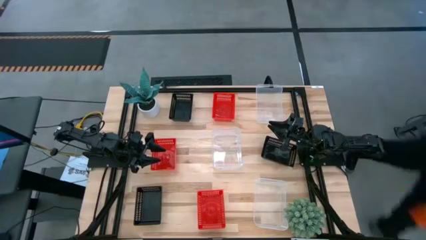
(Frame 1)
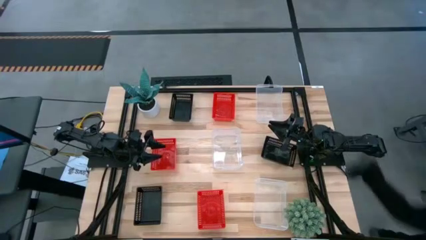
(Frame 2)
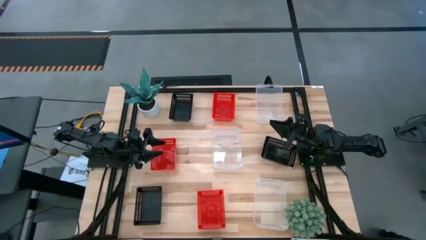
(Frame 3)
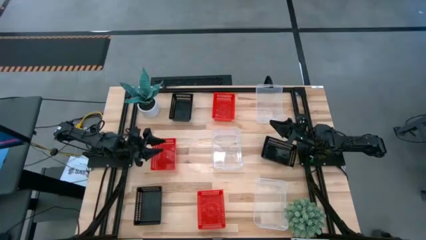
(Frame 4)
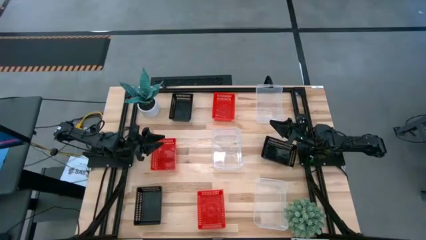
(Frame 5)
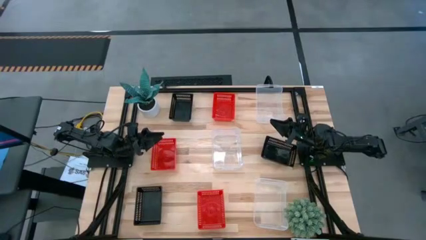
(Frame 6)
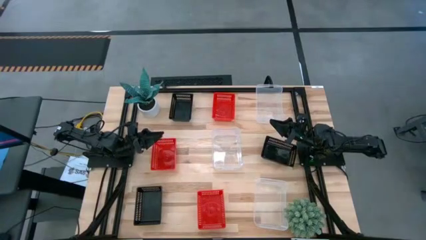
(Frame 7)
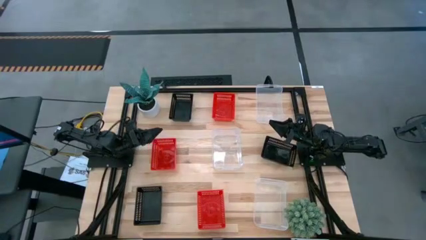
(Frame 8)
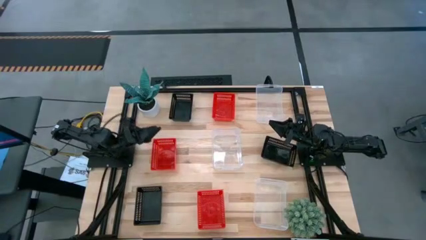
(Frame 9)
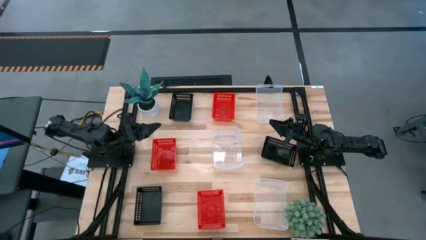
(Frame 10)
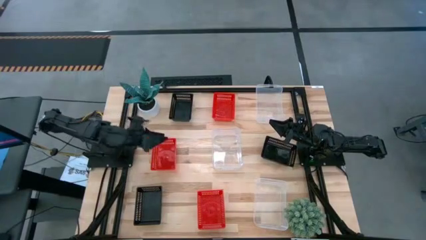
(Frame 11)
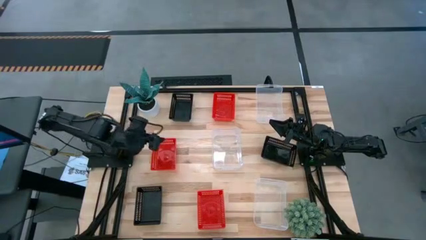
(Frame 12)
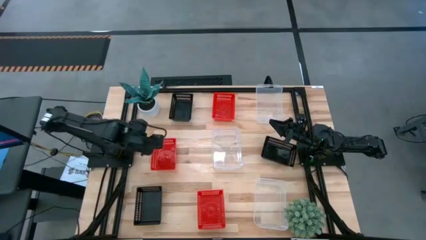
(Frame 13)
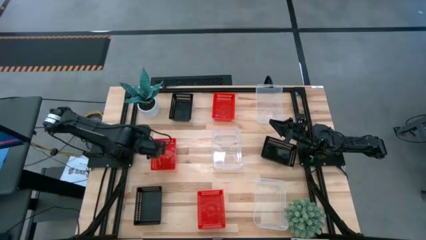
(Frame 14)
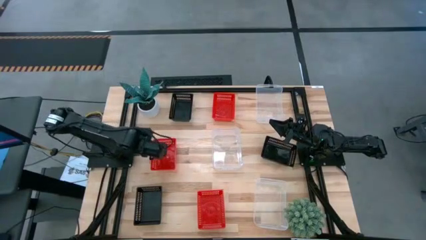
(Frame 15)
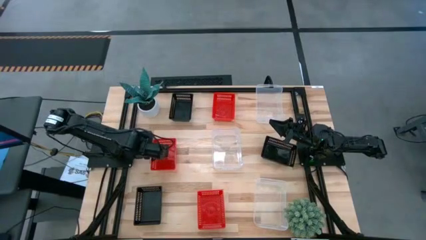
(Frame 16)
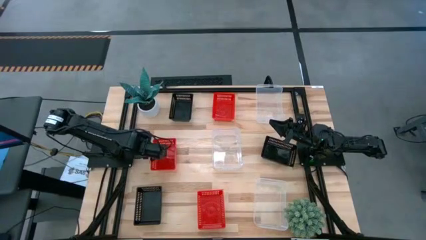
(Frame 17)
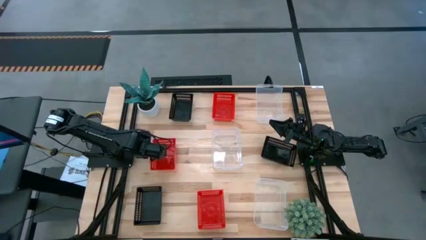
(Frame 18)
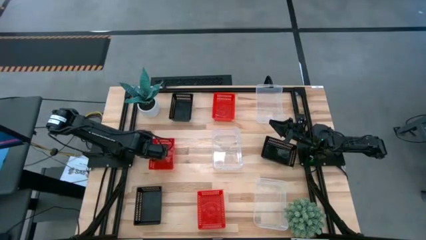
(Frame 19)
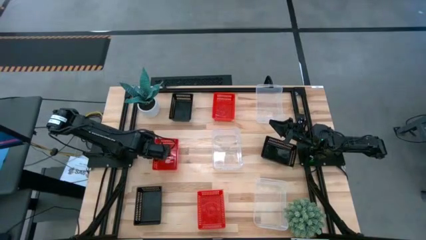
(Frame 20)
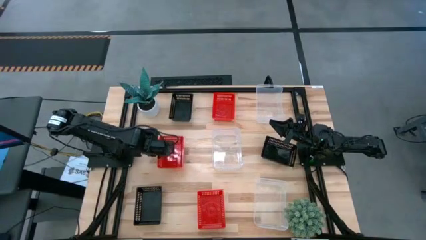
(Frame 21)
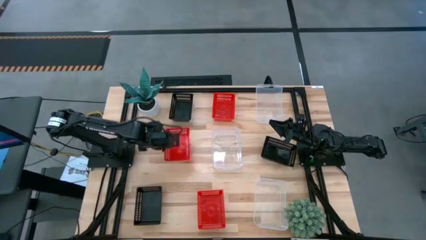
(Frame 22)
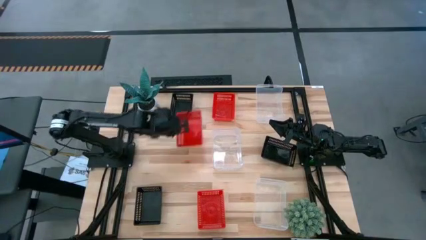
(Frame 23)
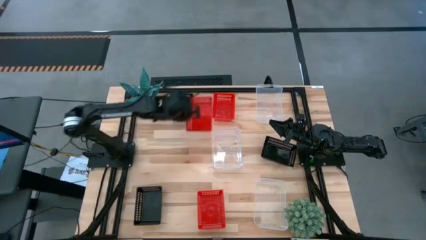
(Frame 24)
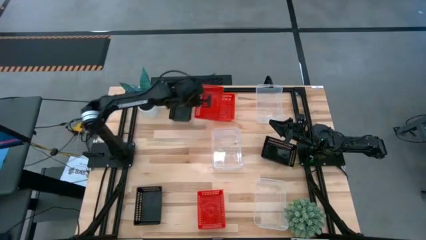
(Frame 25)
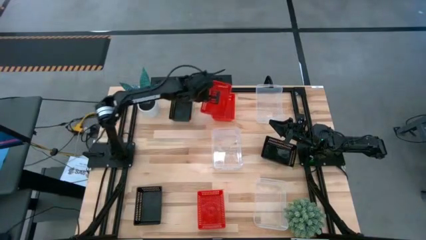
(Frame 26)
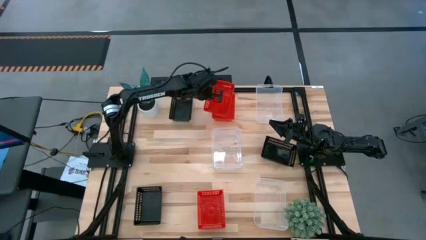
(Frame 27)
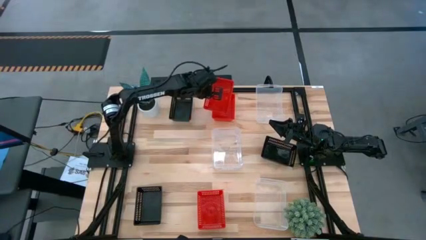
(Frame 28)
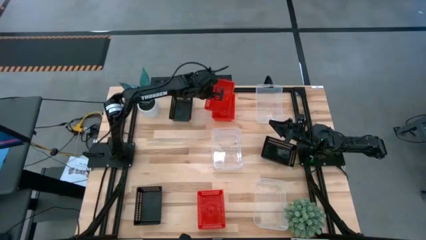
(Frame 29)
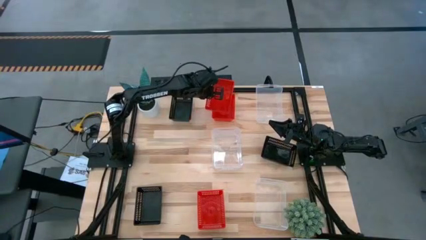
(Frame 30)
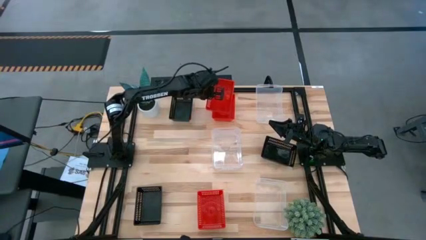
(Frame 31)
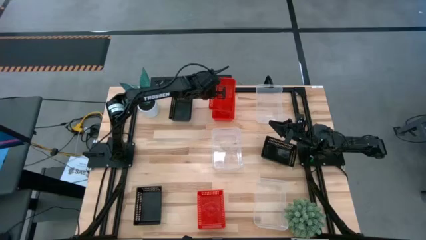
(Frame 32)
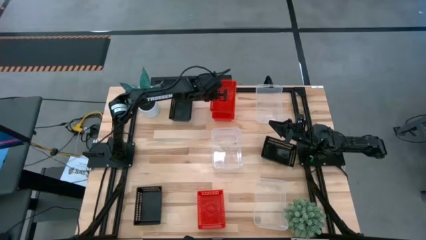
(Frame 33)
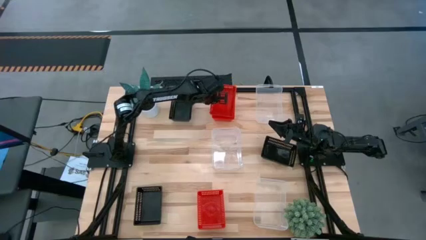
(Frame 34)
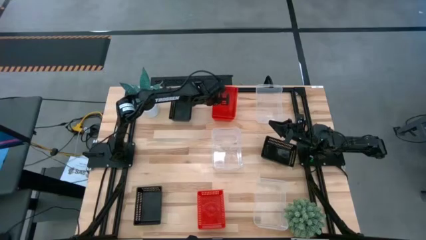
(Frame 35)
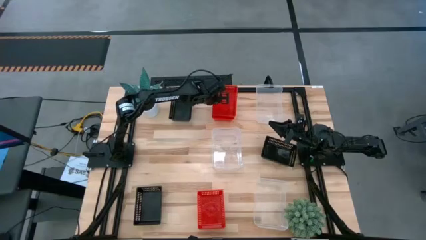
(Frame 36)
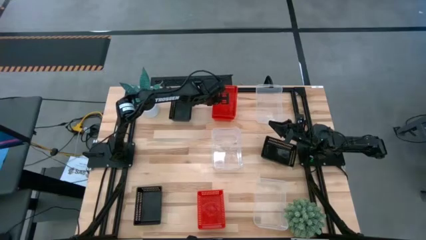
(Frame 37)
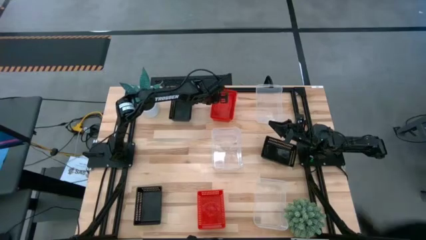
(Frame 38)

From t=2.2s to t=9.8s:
Stack the middle red bin on the top red bin

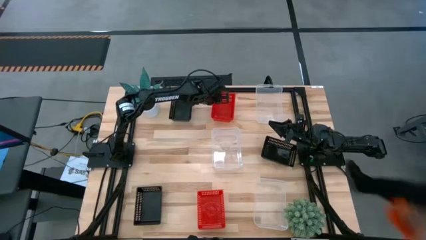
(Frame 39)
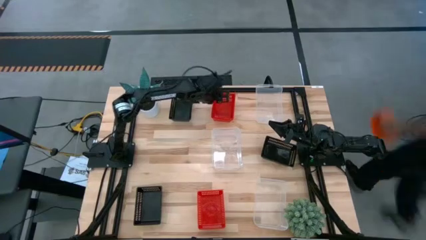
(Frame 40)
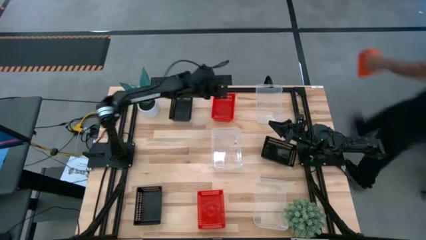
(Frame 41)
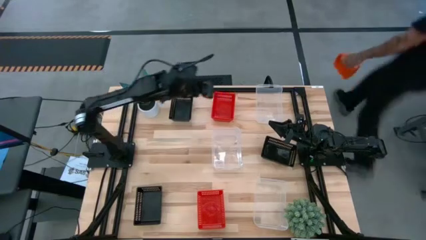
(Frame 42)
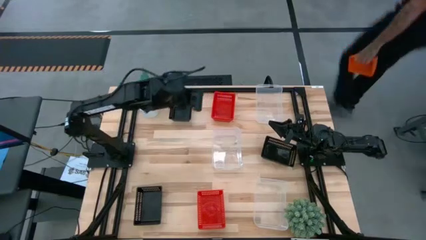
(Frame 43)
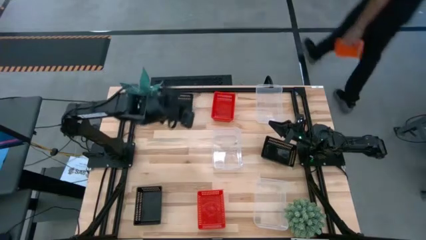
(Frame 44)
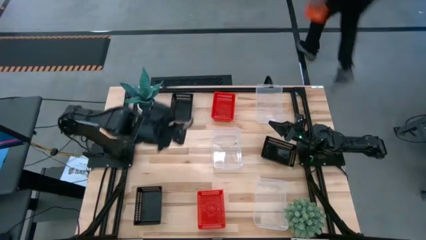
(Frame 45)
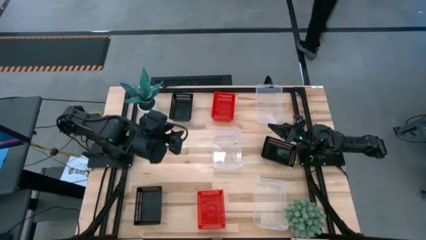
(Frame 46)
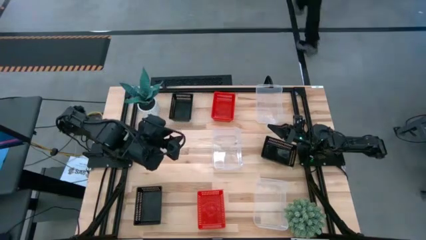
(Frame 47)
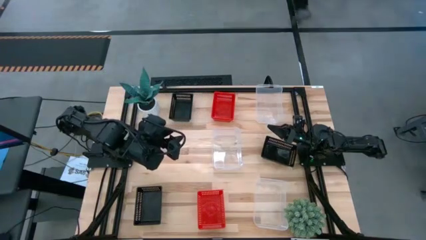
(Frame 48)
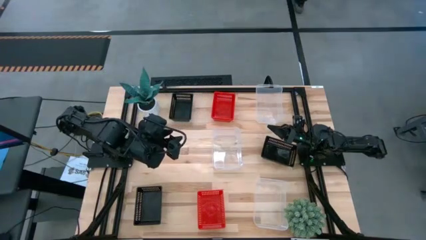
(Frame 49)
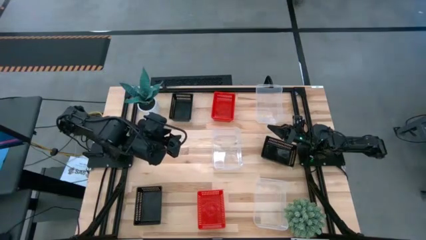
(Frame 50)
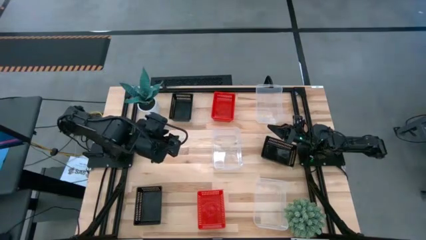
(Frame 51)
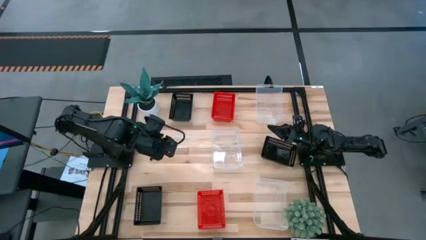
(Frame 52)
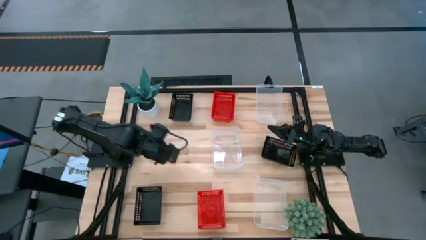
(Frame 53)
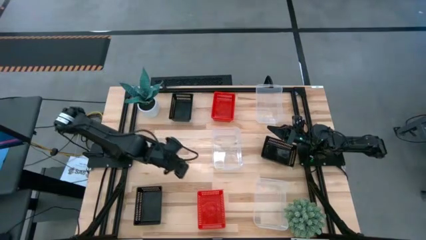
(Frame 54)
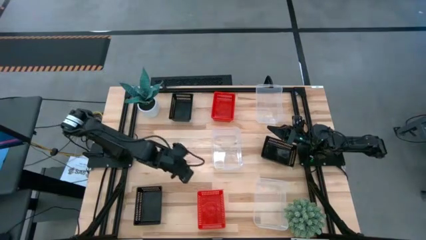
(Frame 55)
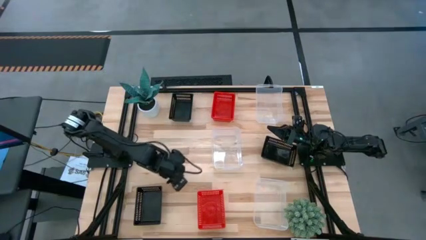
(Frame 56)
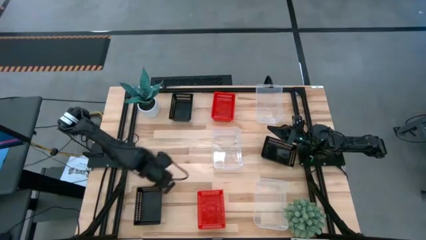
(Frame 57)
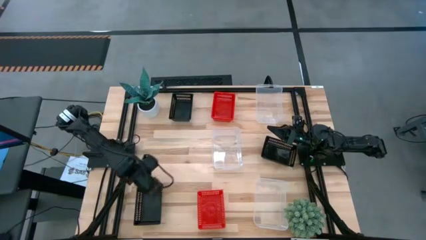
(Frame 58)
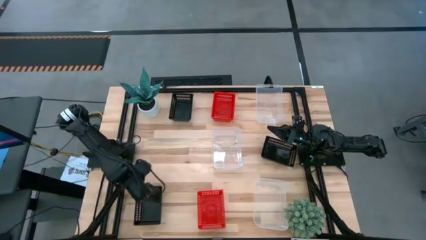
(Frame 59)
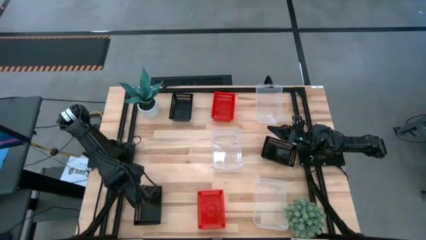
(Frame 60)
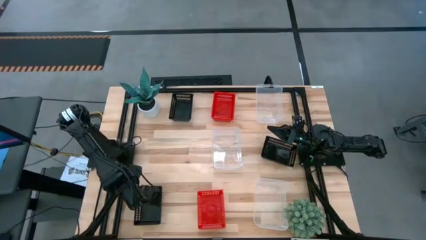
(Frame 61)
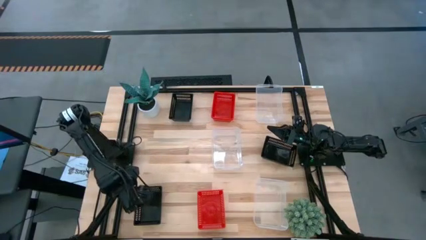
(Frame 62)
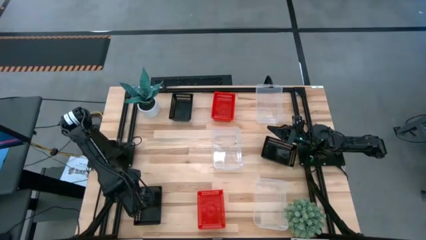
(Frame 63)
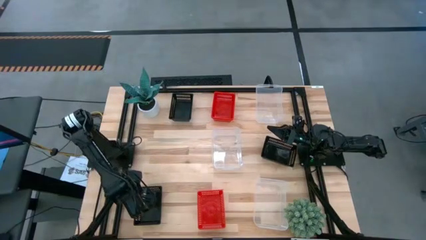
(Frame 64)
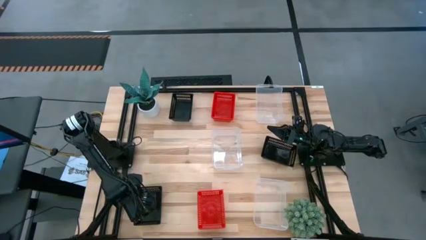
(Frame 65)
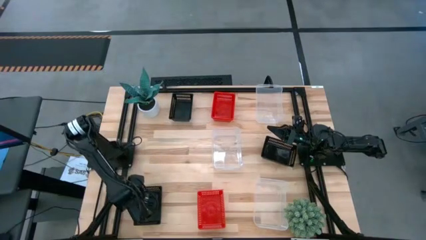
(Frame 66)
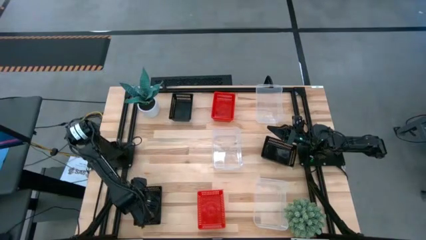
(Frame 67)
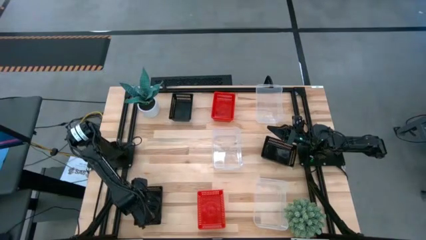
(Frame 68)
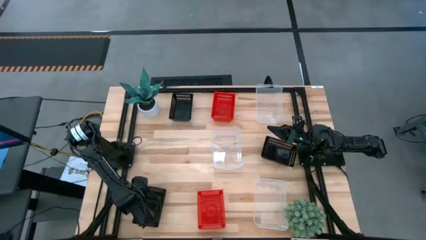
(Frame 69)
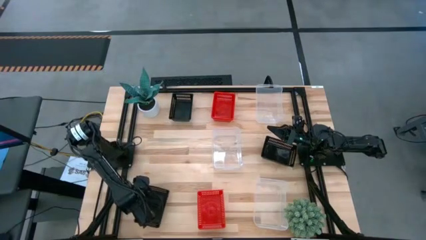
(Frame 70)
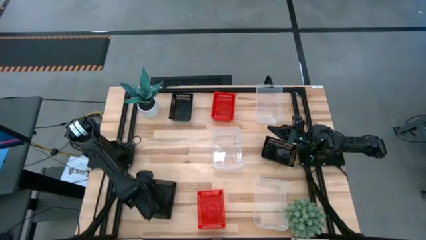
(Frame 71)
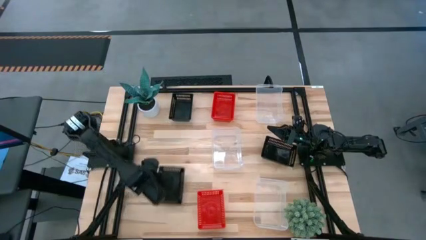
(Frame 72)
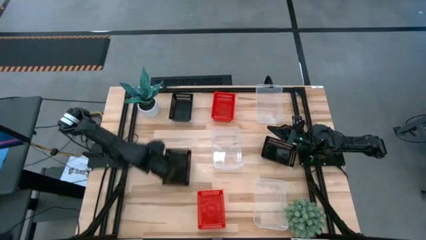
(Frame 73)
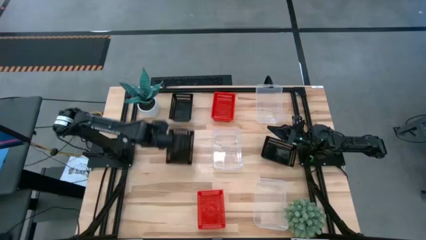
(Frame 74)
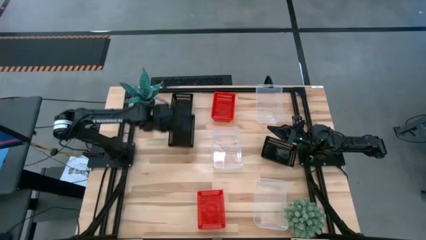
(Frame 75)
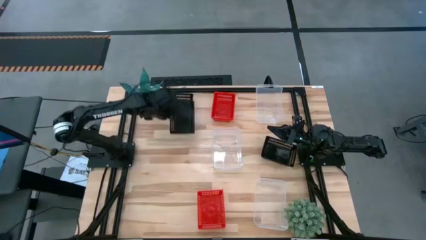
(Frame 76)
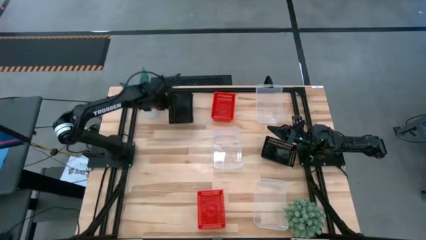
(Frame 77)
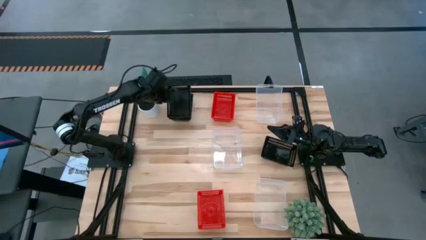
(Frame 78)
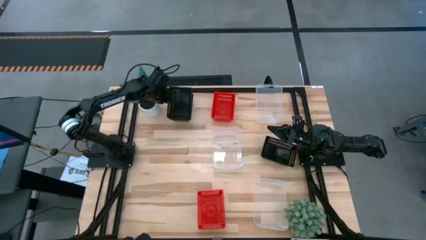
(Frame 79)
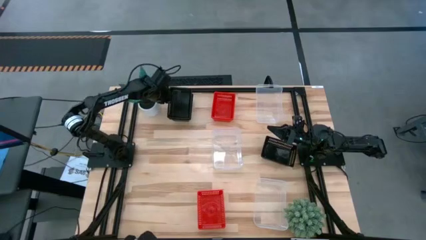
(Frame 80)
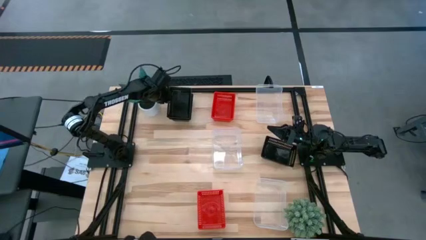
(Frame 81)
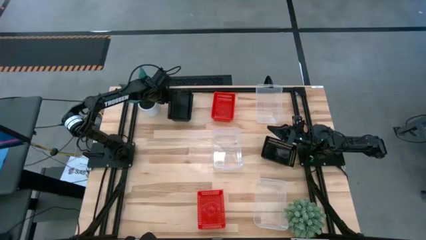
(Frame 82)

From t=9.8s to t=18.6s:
Stack the bottom black bin on the top black bin
